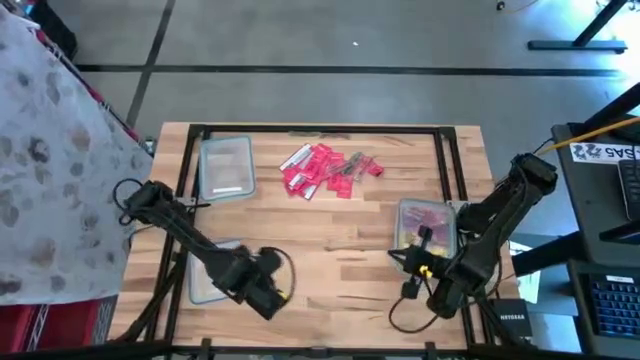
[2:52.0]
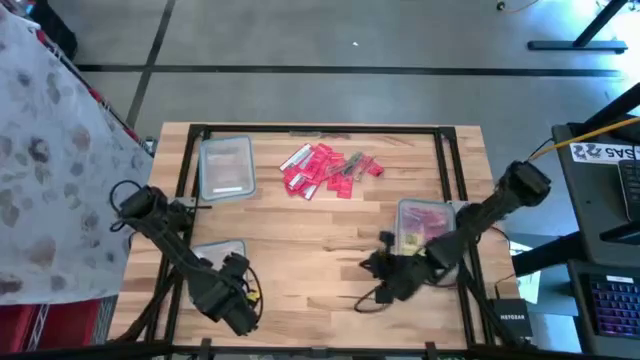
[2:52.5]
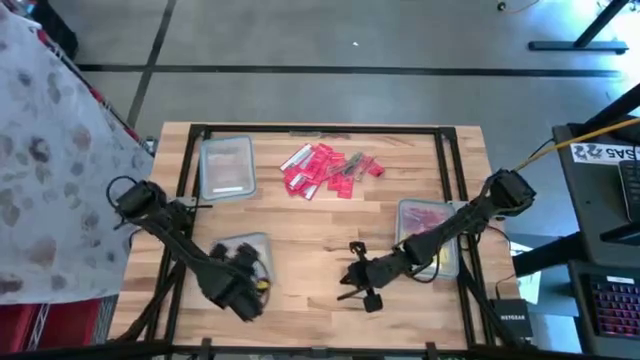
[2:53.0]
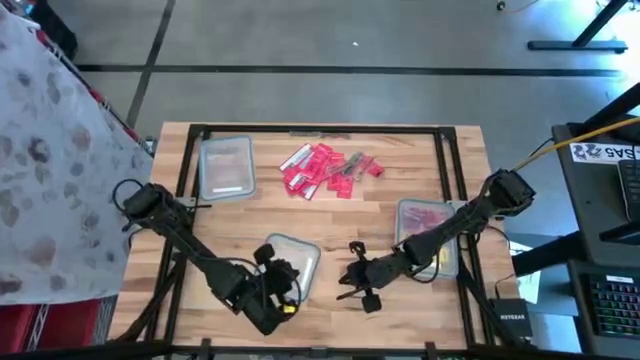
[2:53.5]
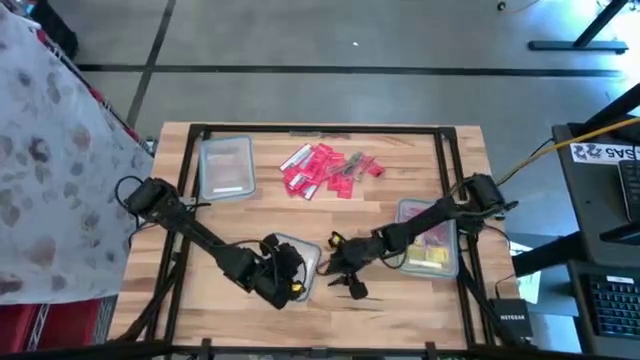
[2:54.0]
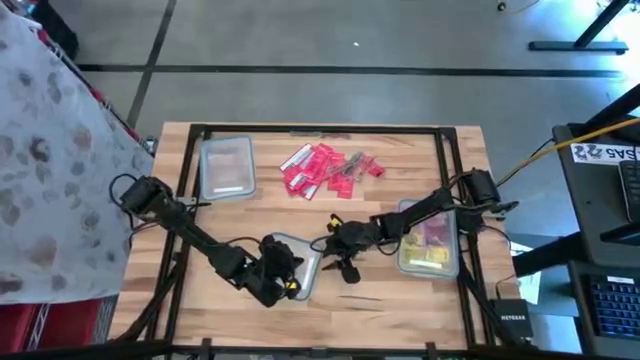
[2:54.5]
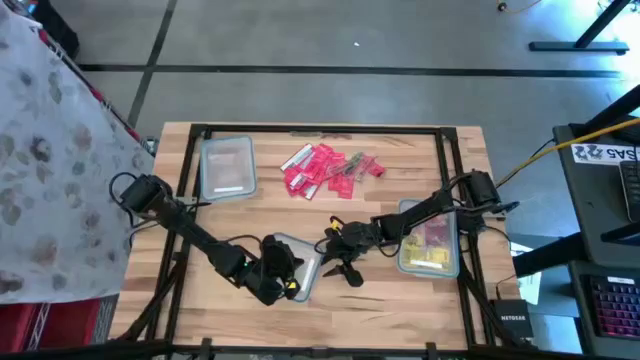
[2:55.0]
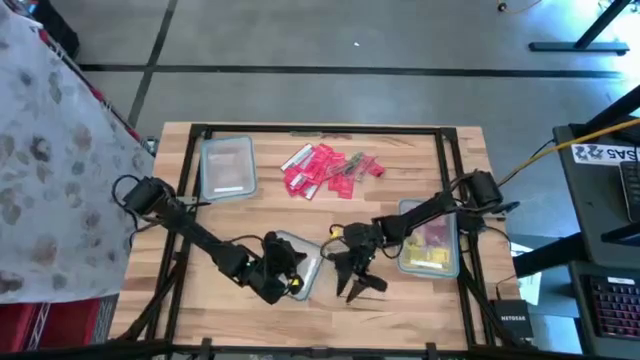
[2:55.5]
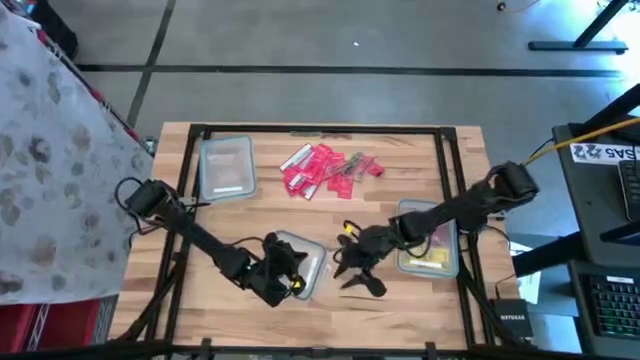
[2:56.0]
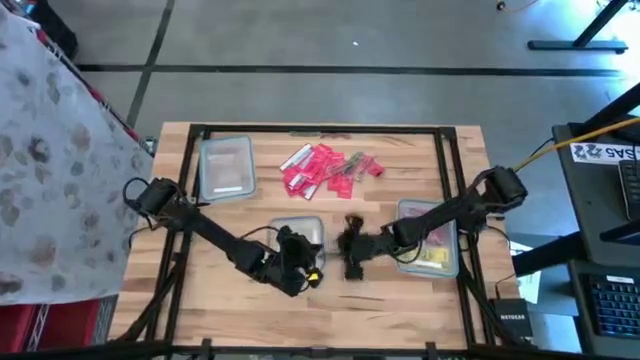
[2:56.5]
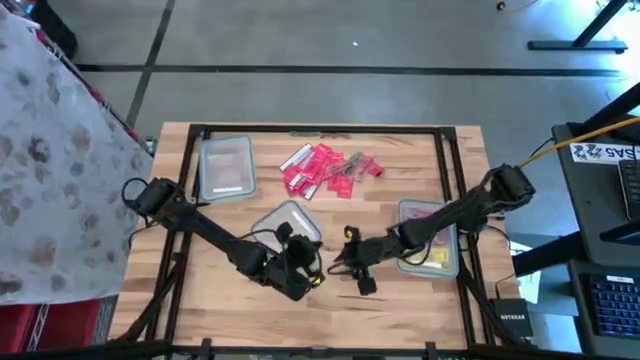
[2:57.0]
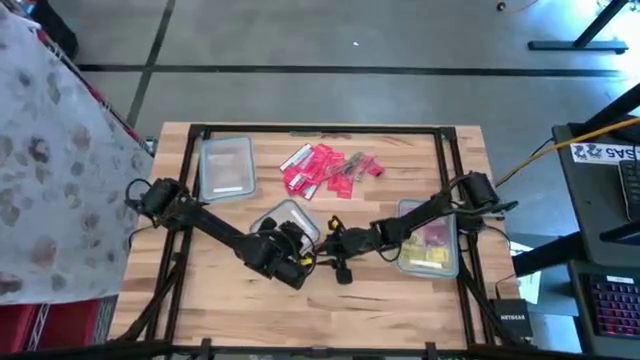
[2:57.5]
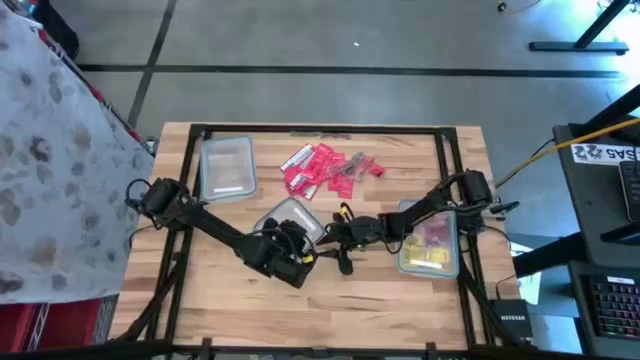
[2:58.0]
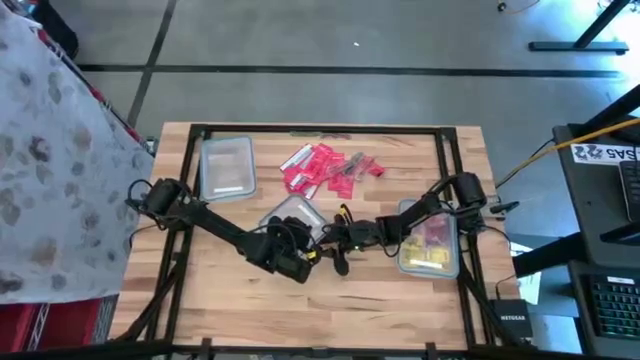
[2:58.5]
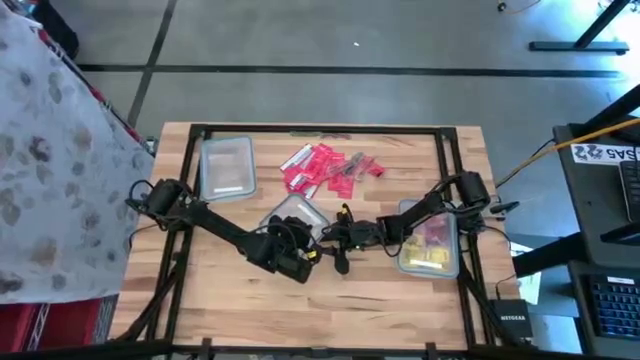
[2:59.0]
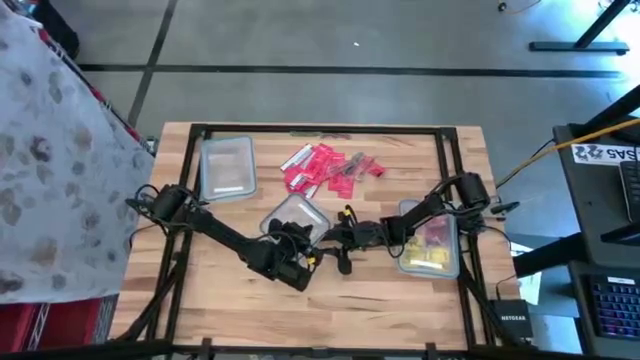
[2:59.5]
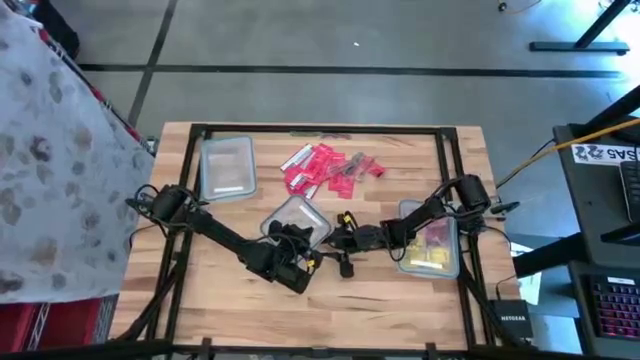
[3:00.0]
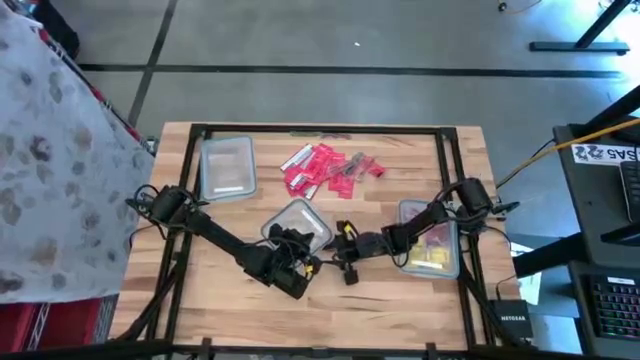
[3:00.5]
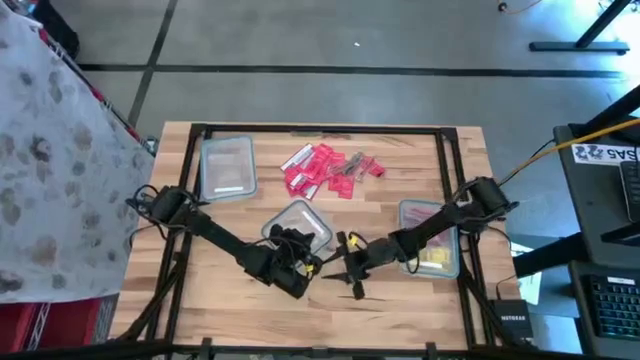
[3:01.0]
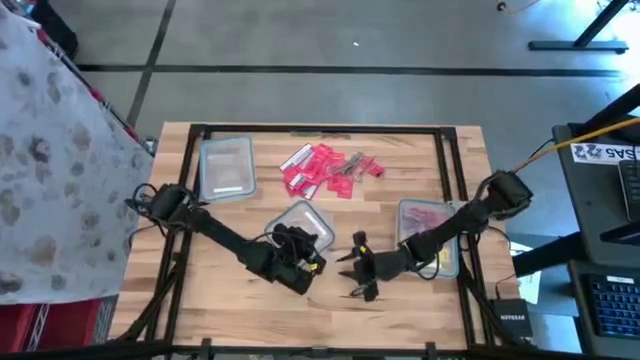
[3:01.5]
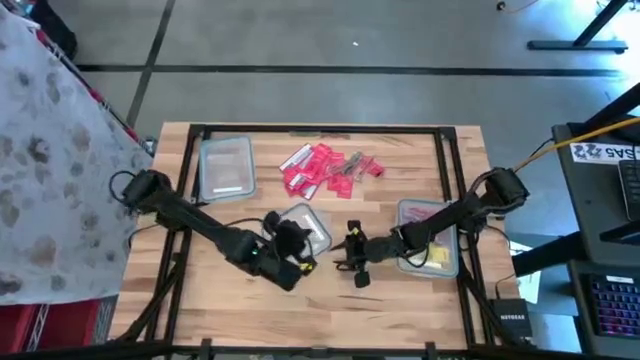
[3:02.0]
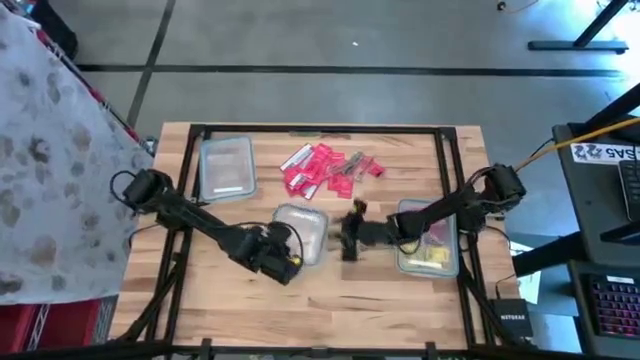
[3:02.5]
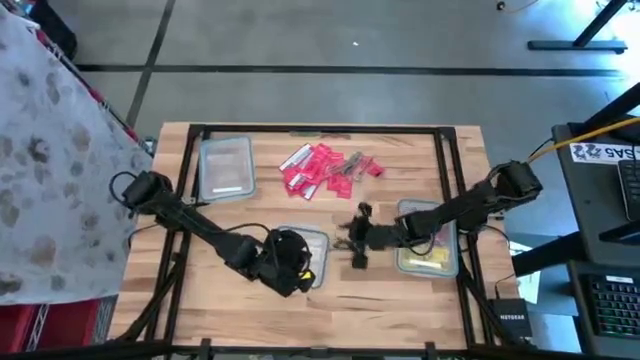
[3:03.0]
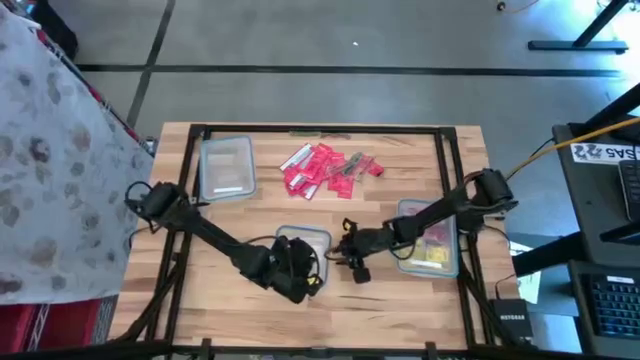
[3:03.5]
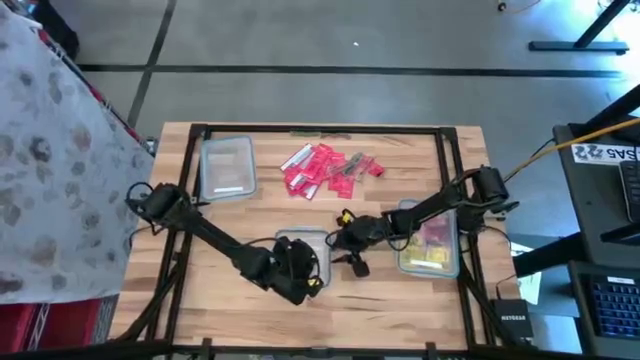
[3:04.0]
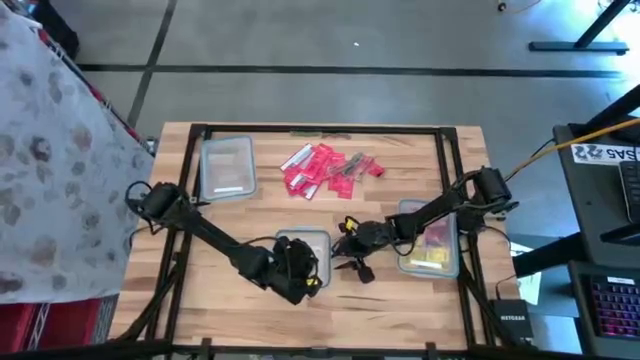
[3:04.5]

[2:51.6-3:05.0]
Task: Sort candy
Open the square transparent bin

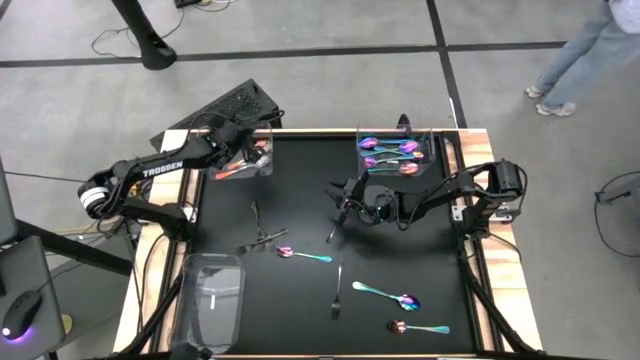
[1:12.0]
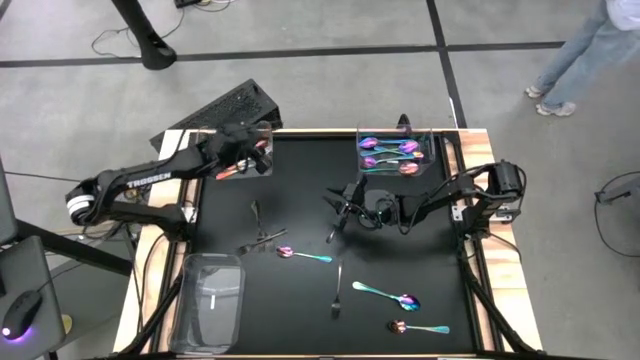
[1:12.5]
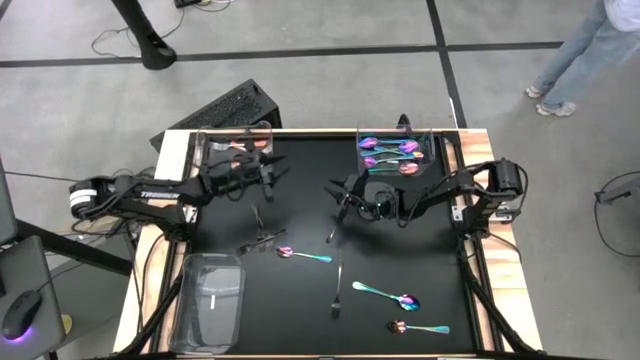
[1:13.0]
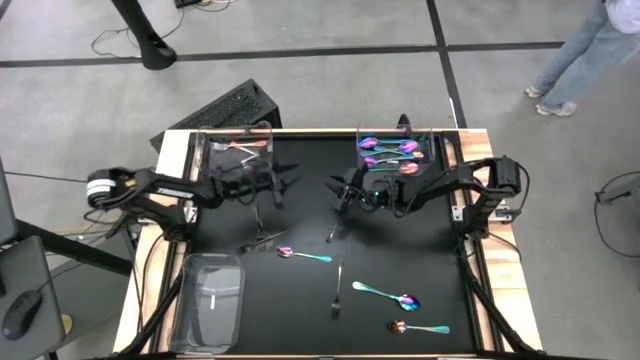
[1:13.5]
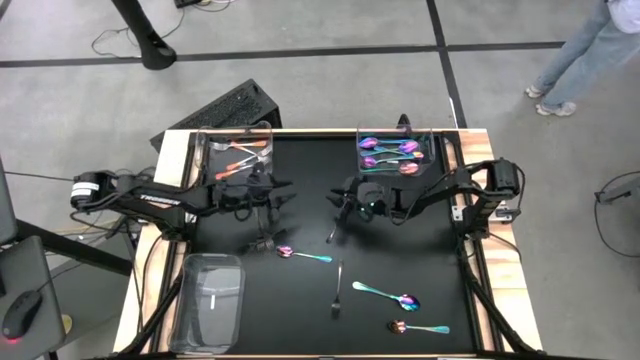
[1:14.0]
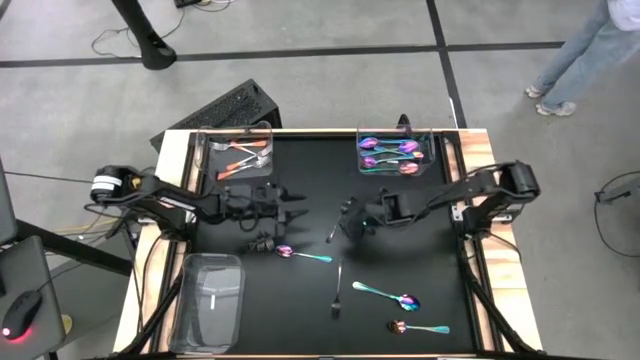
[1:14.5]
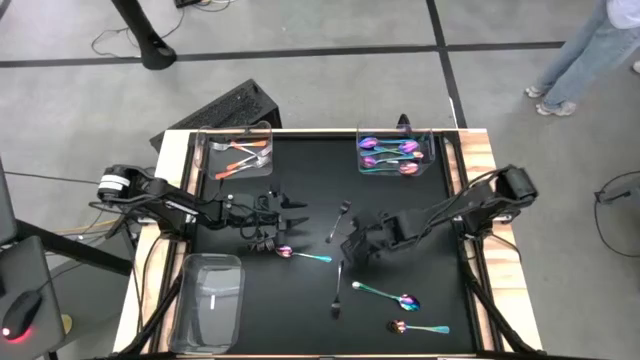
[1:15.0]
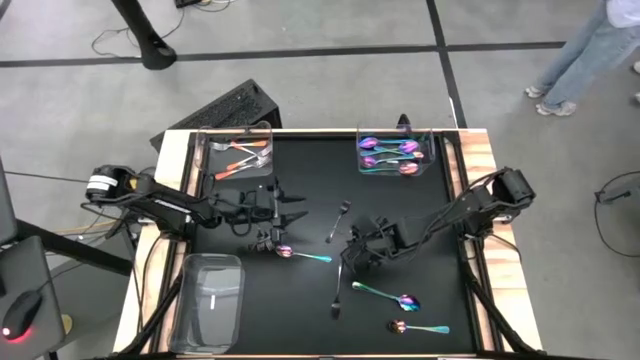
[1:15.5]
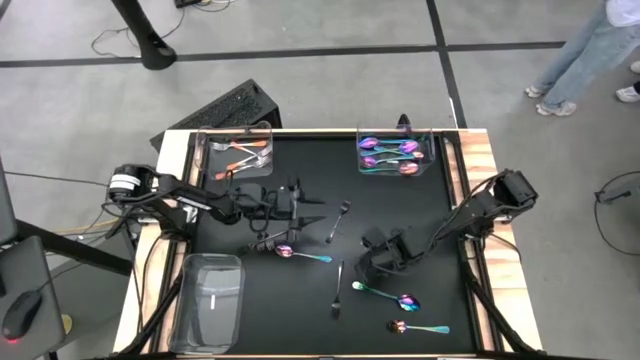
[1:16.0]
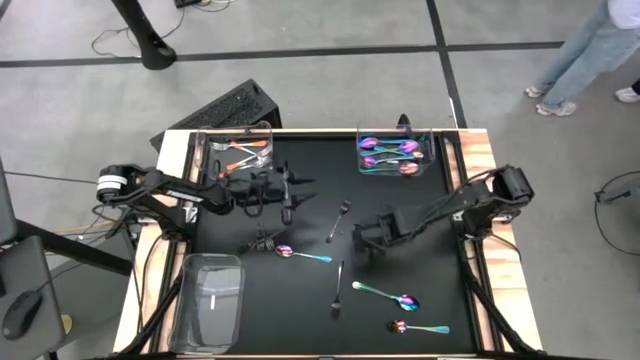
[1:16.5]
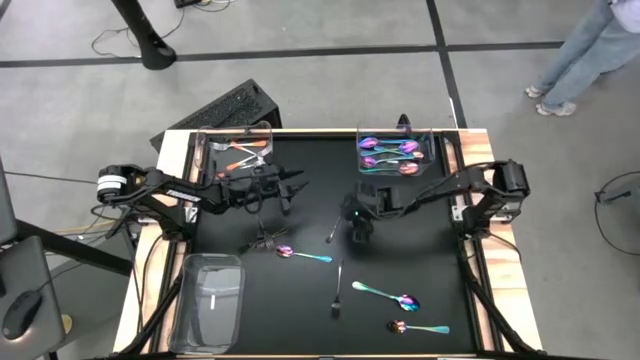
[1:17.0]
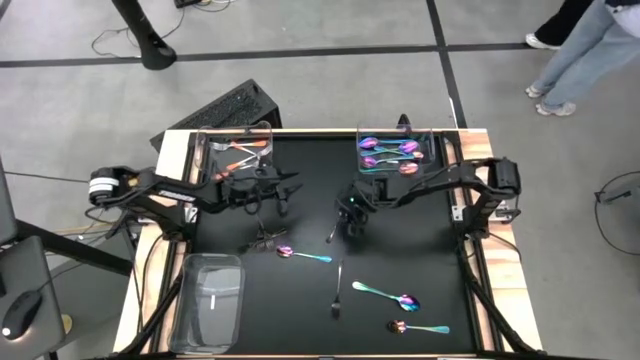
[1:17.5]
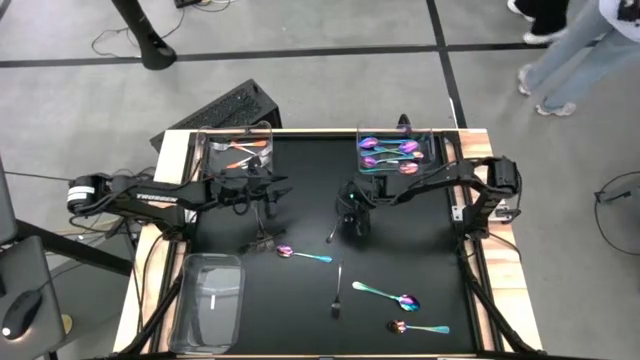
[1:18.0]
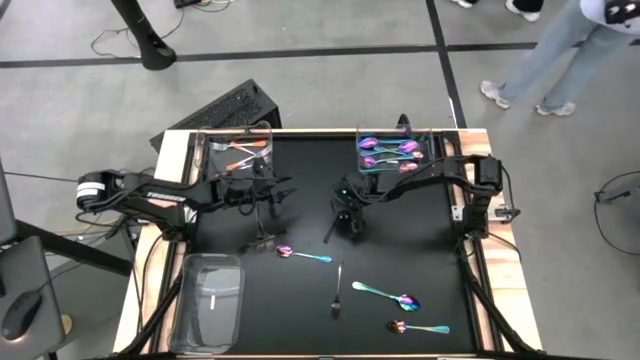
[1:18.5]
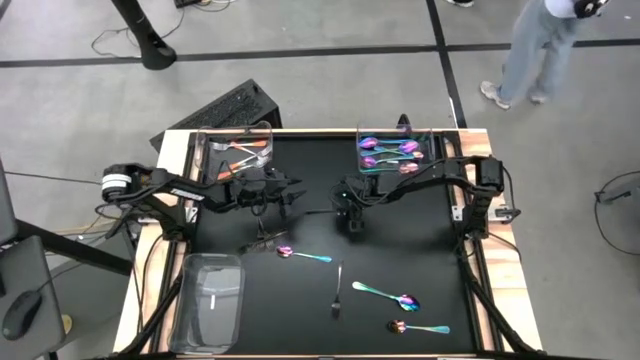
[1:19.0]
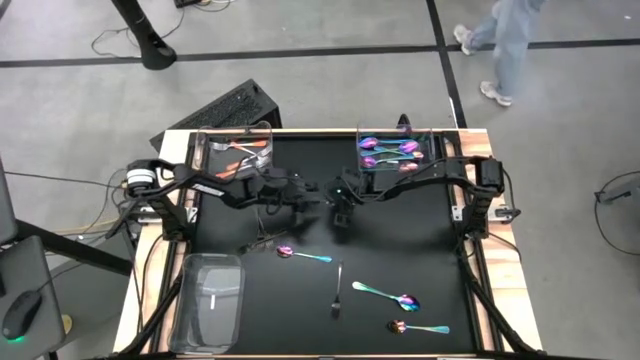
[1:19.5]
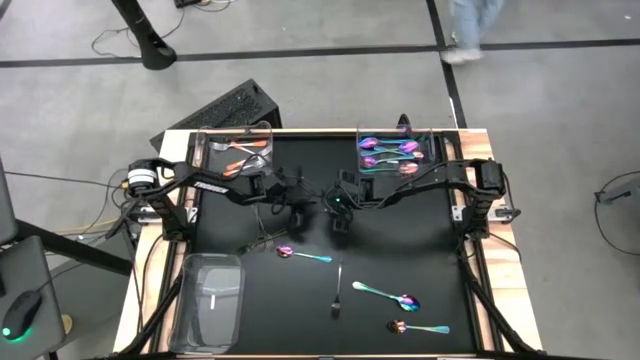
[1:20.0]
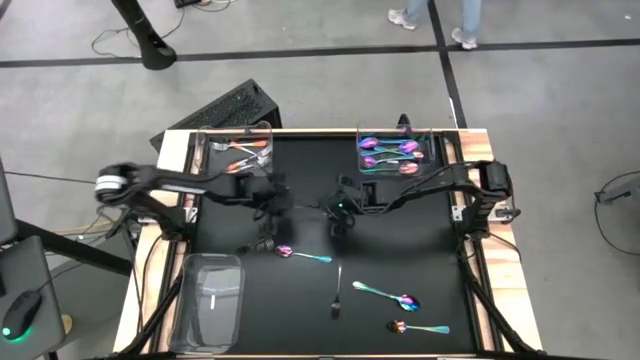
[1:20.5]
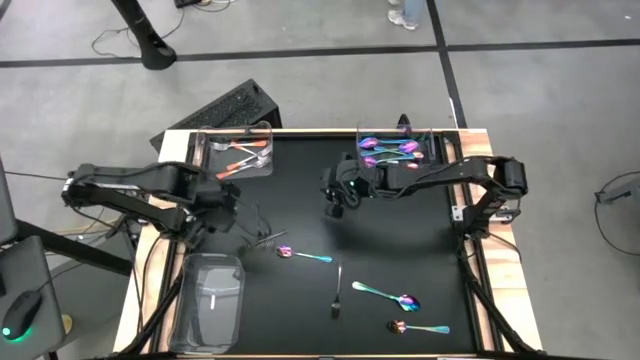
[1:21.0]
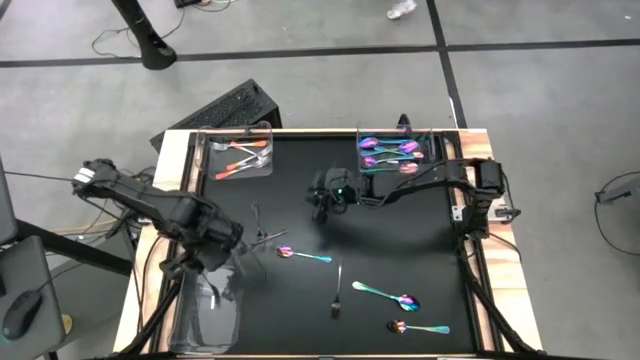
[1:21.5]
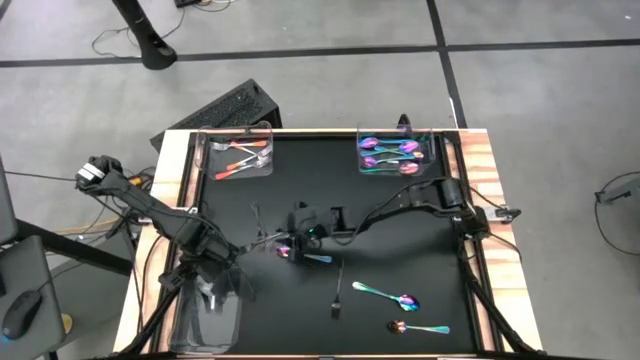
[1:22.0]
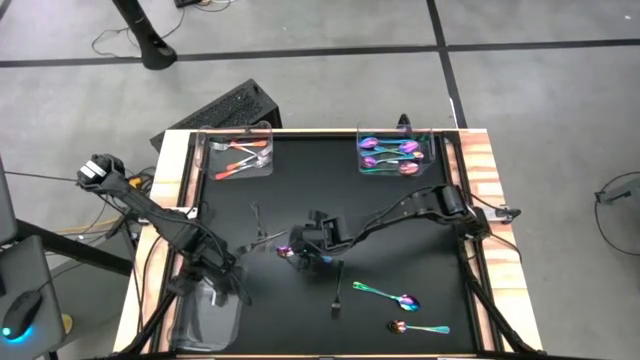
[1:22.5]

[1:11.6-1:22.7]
Task: Sort silverware by color (type)
Put the black fork into bottom transparent bin
